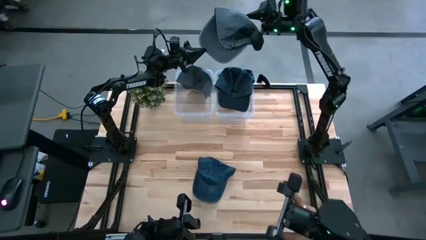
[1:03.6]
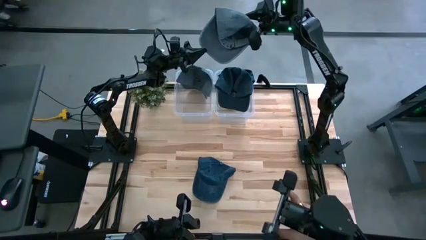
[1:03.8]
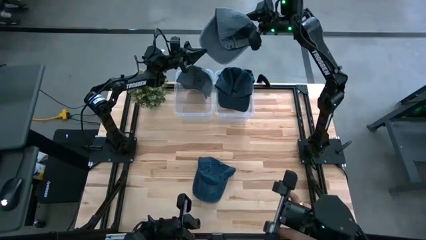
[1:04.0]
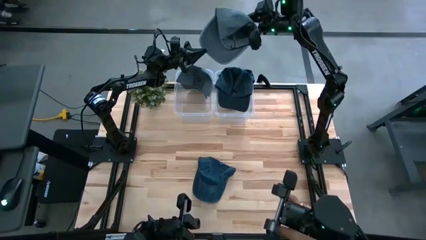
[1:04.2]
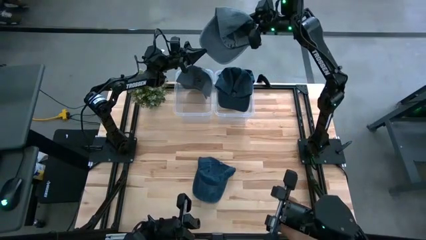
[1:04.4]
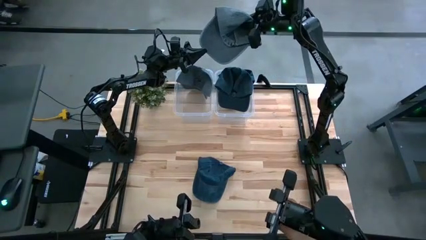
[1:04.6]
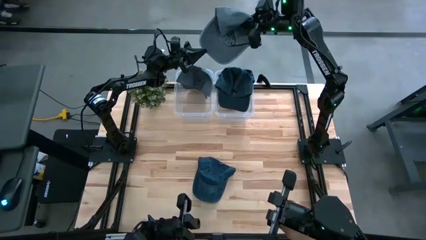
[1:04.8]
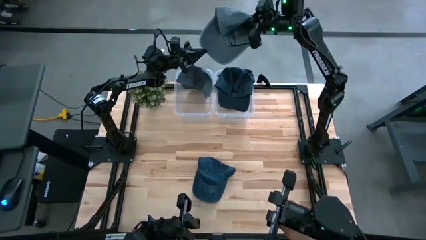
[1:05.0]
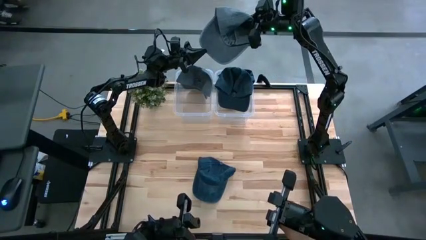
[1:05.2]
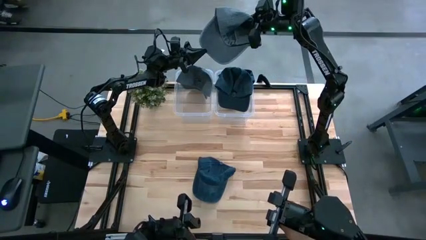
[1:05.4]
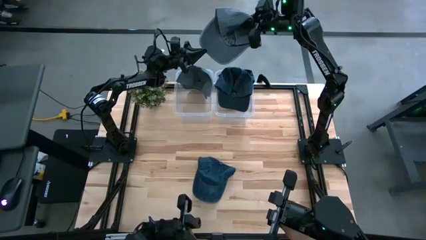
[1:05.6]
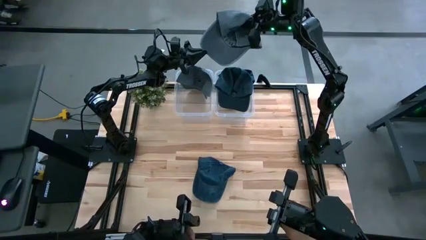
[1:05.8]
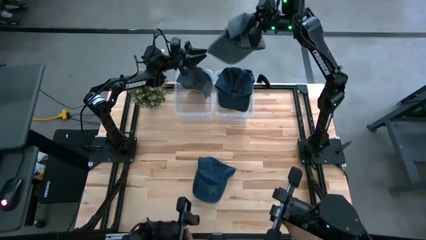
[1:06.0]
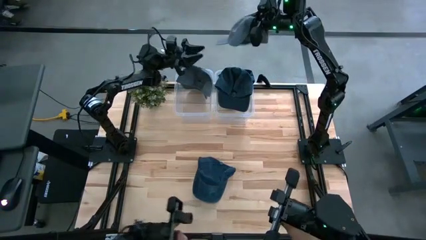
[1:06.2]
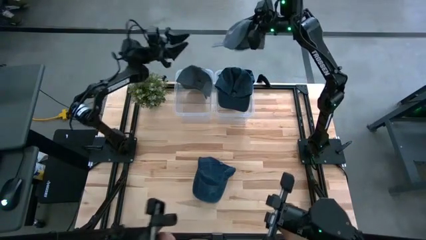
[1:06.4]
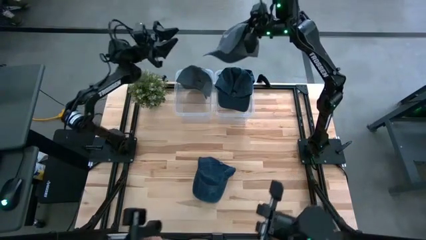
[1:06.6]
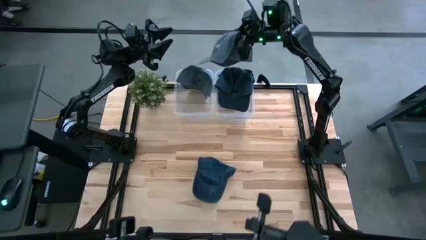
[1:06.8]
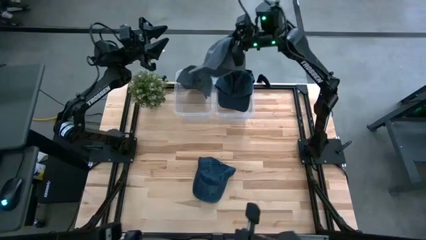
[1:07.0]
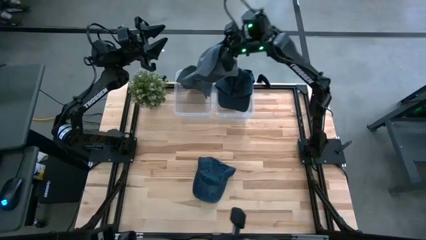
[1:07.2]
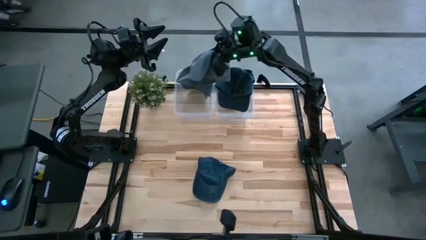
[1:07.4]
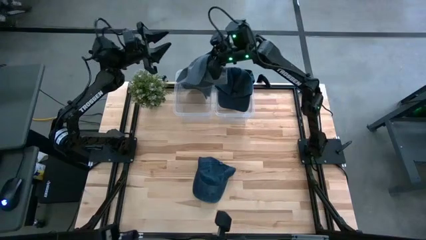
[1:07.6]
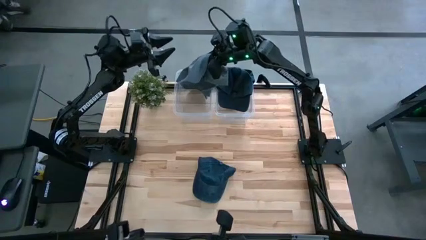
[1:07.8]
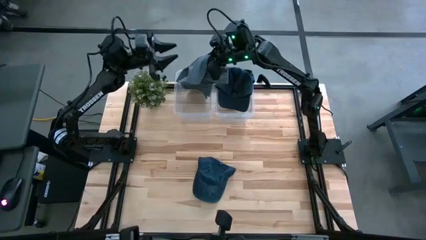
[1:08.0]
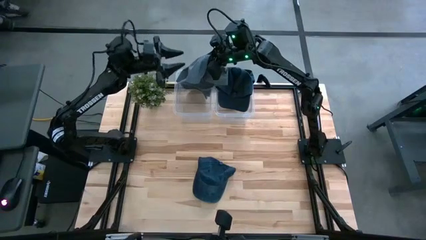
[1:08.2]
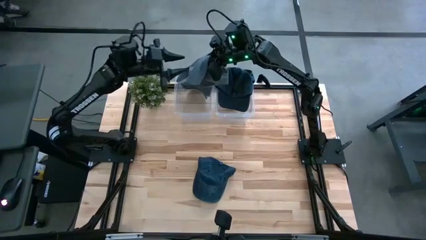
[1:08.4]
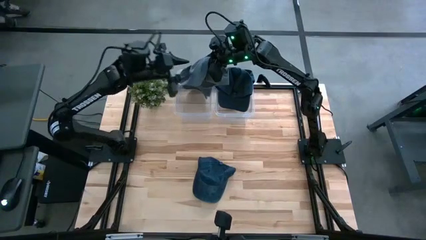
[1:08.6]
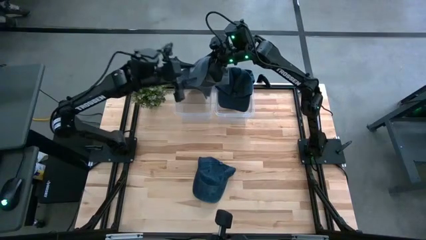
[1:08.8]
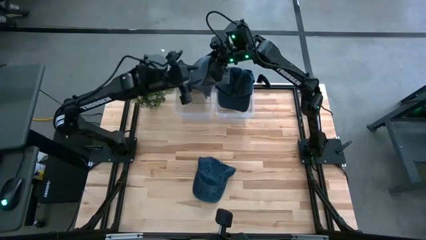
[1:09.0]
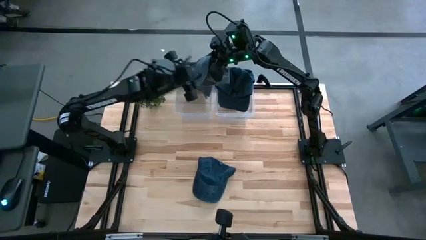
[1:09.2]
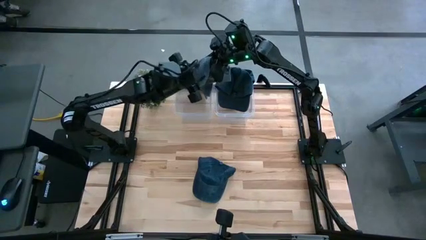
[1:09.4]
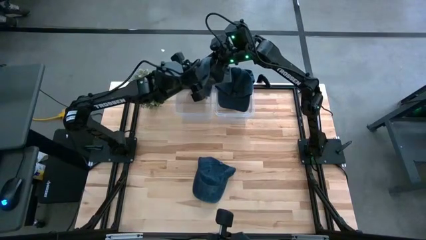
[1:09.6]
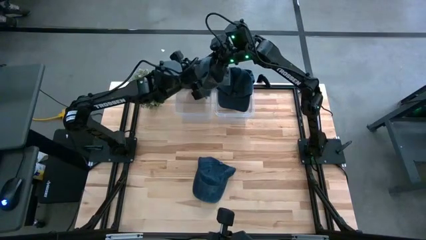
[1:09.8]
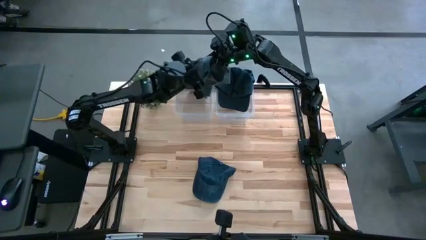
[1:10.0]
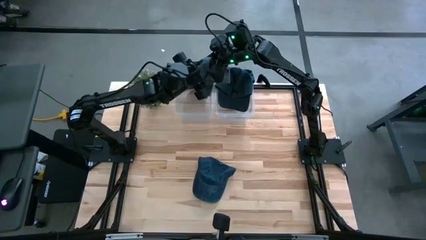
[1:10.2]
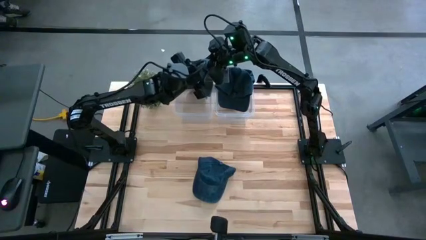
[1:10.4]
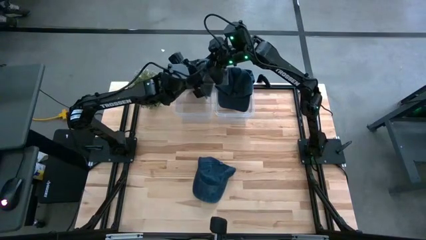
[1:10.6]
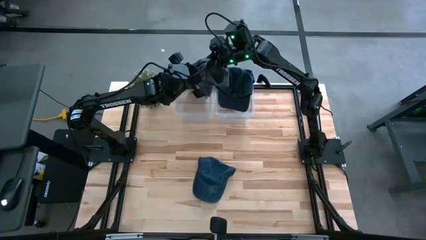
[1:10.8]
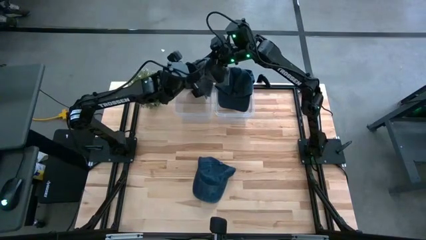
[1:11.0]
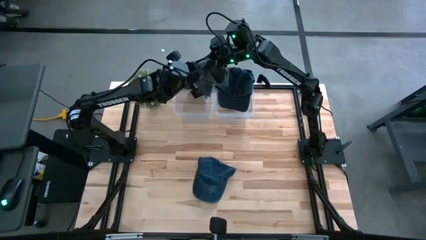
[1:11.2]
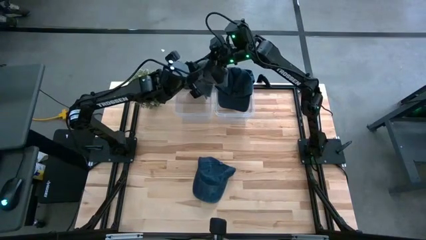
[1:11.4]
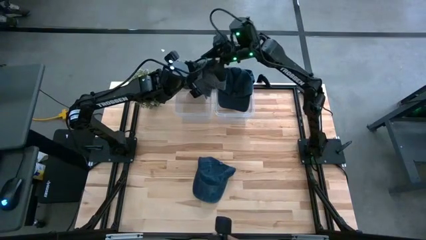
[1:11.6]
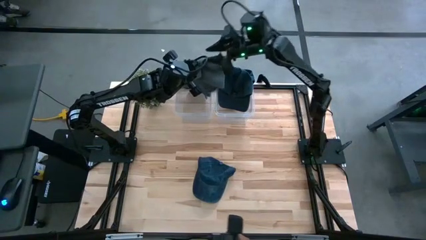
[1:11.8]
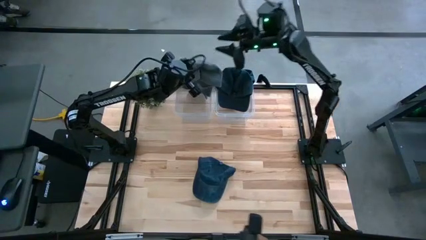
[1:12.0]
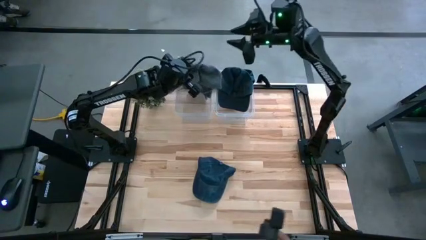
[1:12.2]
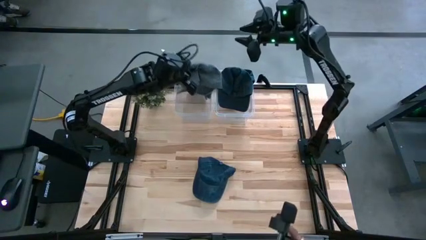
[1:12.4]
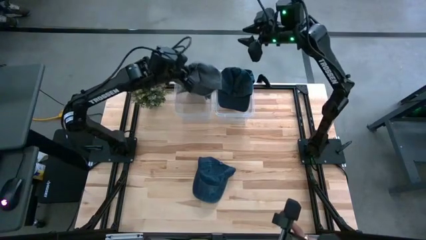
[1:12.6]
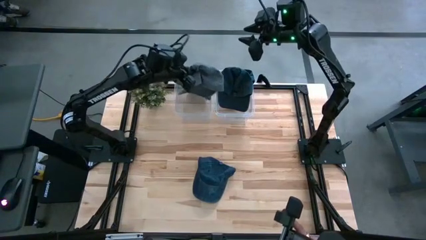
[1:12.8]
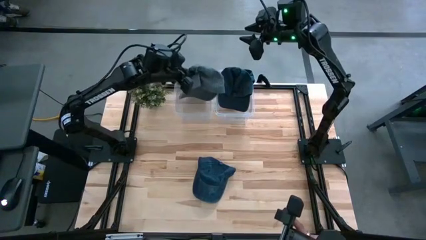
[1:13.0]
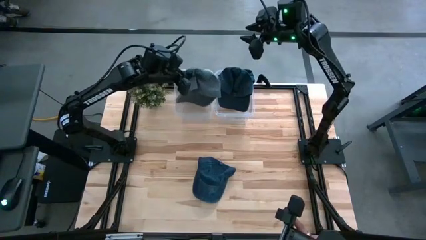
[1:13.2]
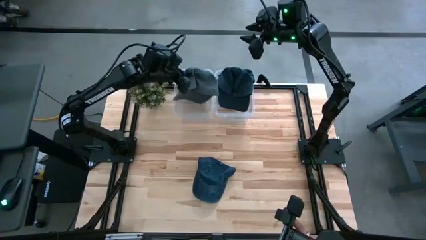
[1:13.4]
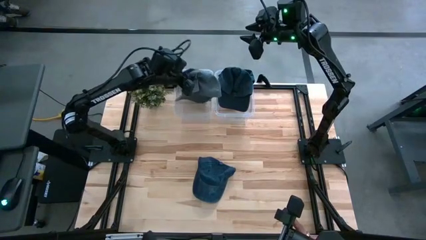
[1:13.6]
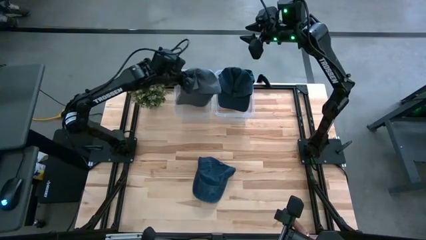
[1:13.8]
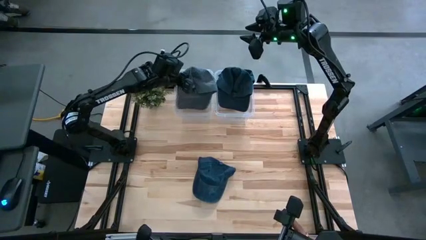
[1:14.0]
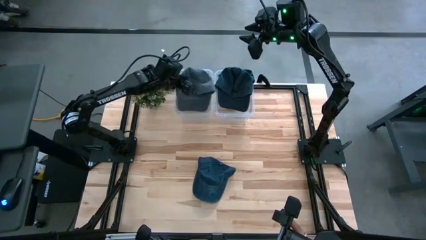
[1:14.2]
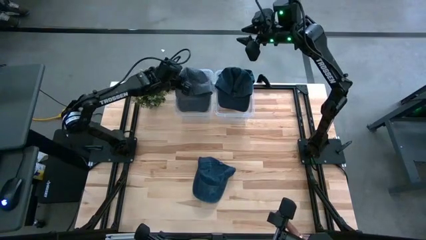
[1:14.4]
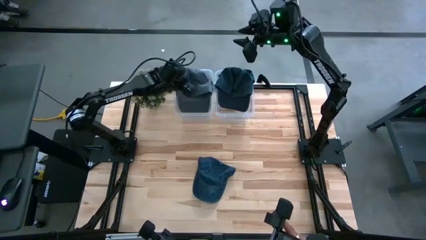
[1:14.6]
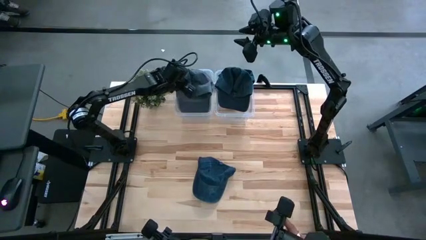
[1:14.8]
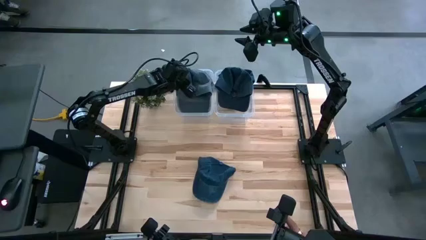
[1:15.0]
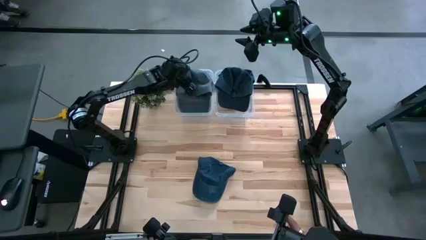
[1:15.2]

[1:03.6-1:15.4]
Task: Pick & Place hat
Put the gray cap into the left transparent bin

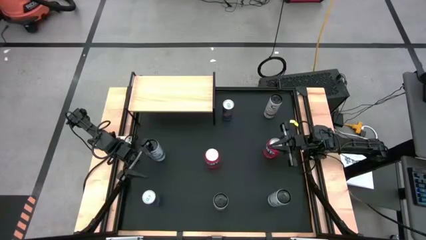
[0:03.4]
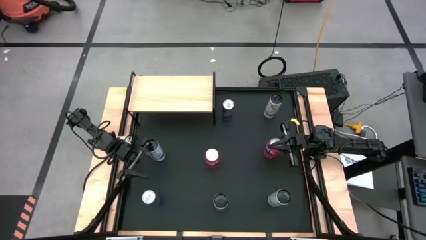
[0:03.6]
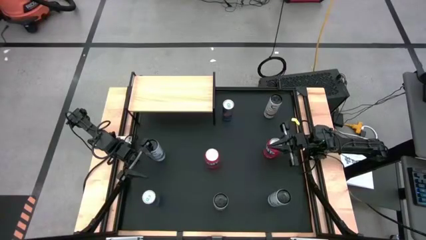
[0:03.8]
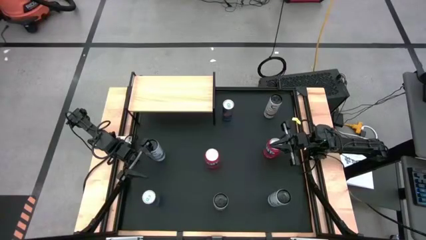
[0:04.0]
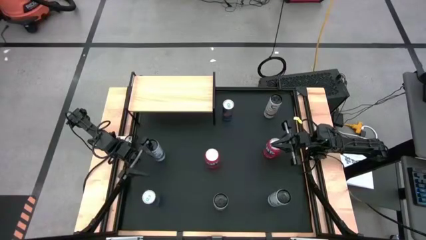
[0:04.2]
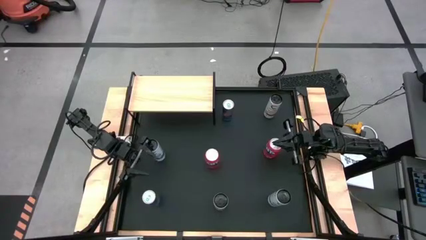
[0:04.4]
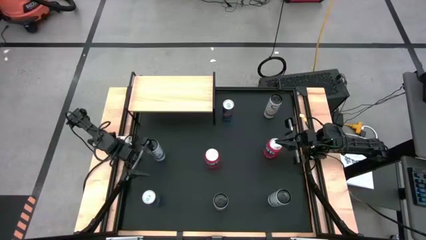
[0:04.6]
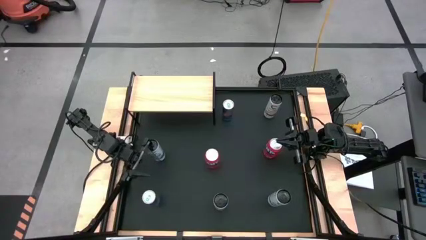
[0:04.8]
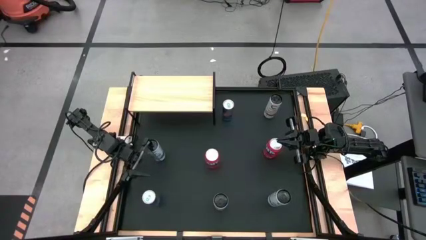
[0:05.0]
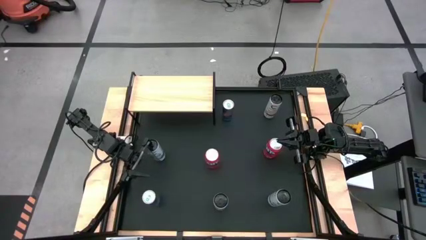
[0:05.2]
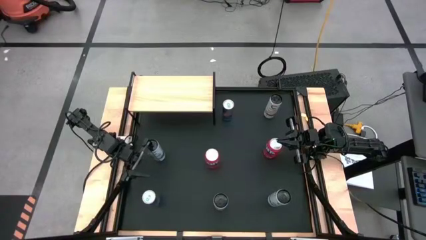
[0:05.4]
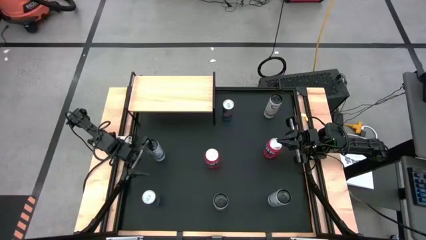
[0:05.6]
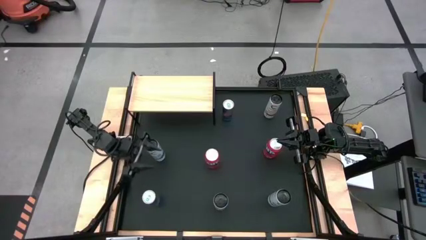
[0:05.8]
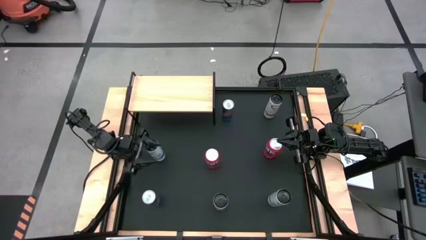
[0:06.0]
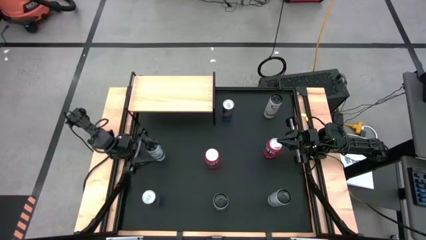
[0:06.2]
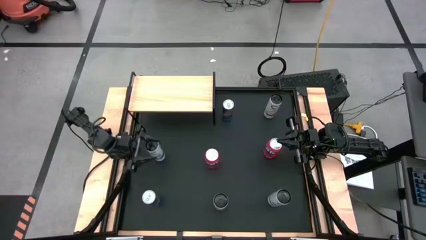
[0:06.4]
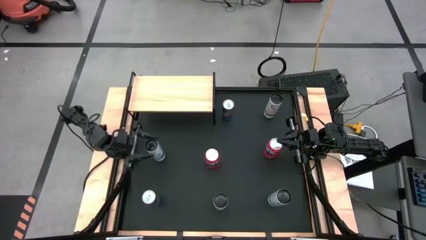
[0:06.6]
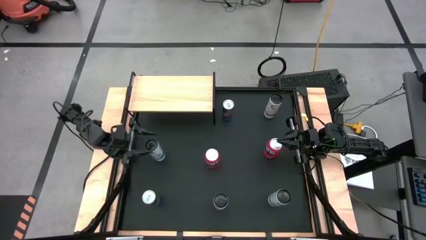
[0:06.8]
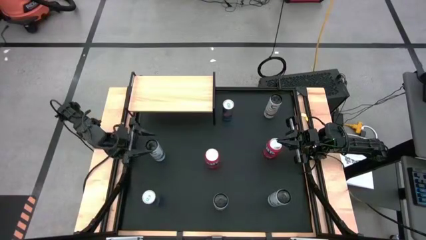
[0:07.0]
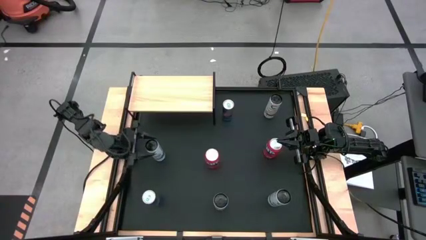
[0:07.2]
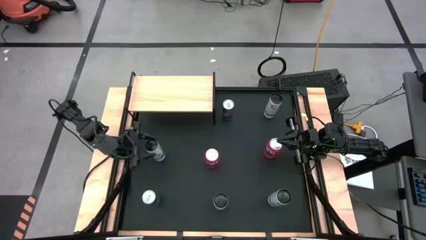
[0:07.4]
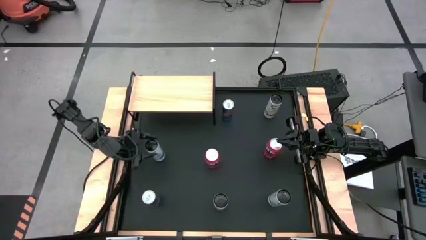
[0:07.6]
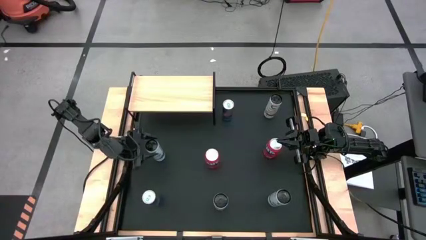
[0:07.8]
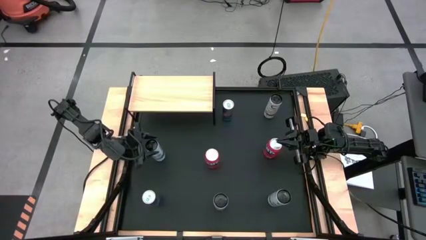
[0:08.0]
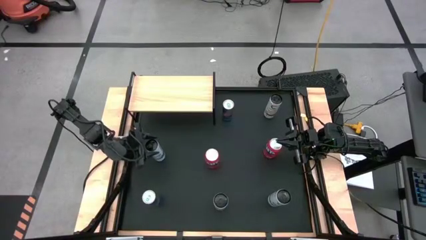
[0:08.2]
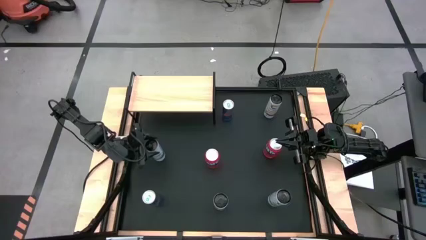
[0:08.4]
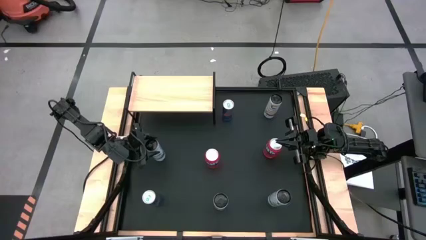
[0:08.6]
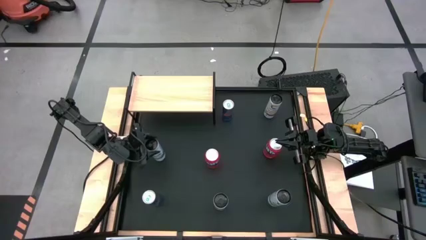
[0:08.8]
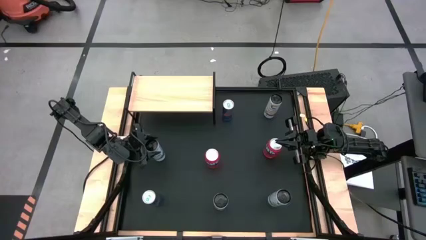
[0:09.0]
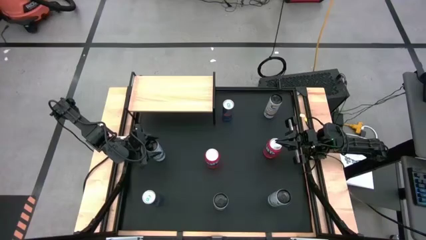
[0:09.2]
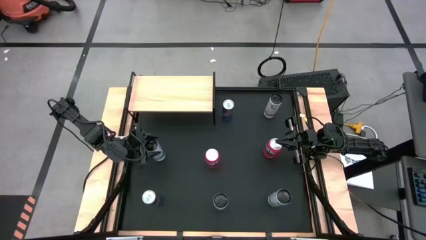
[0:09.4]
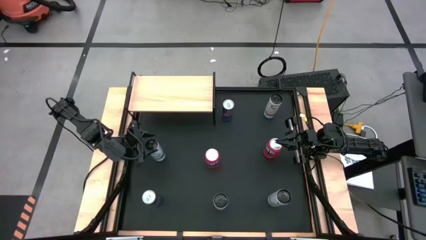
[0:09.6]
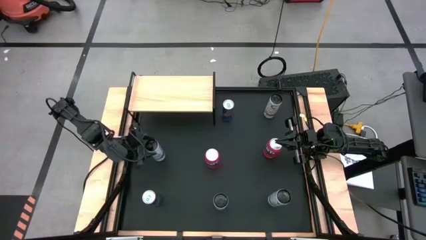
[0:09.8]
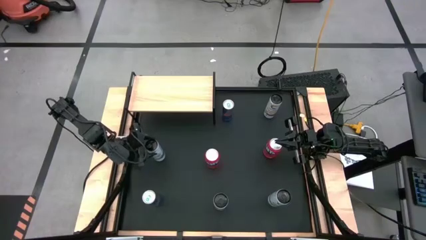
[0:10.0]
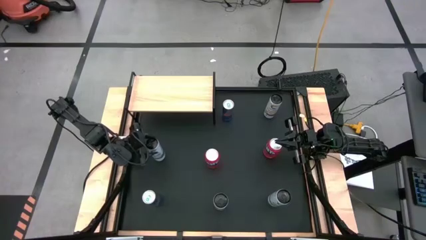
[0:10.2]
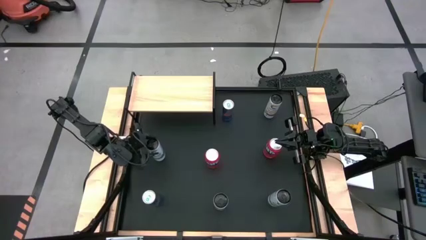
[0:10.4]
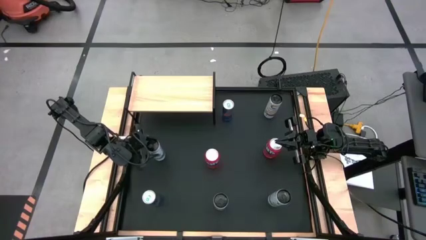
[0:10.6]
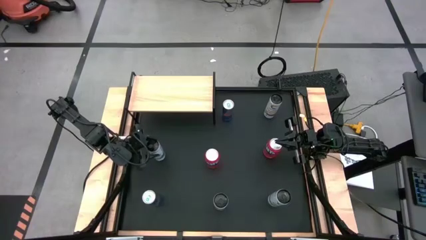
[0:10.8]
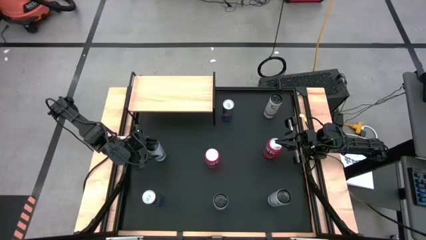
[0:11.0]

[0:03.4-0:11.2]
Task: Place canned beverage on shelf
Put the left white-blue soda can on the shelf
